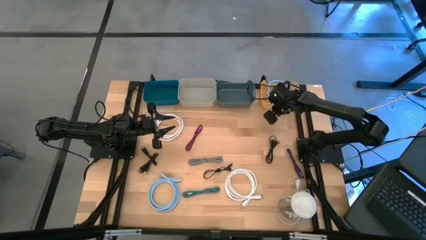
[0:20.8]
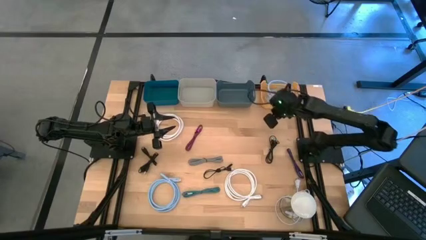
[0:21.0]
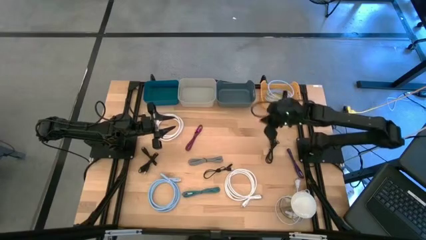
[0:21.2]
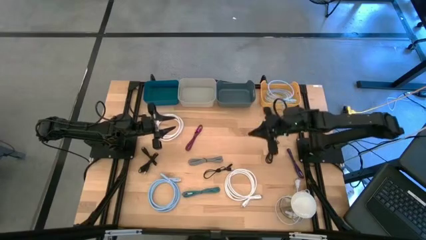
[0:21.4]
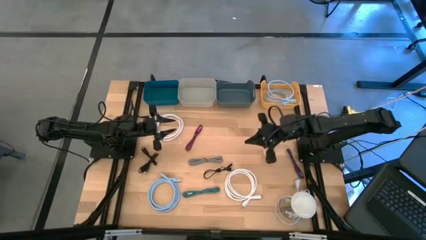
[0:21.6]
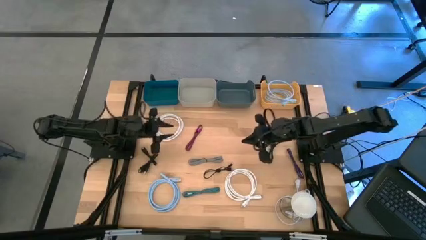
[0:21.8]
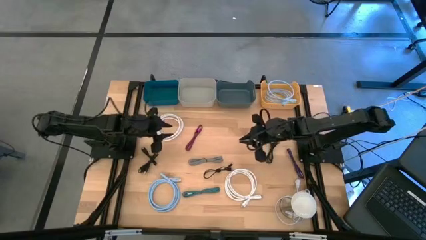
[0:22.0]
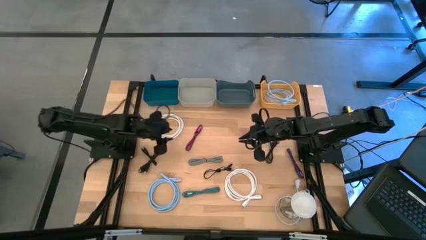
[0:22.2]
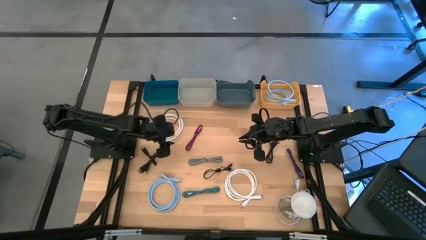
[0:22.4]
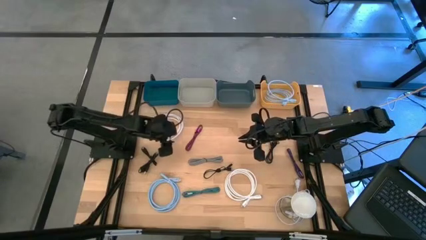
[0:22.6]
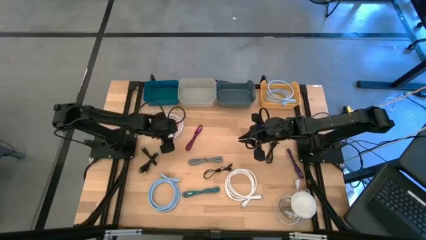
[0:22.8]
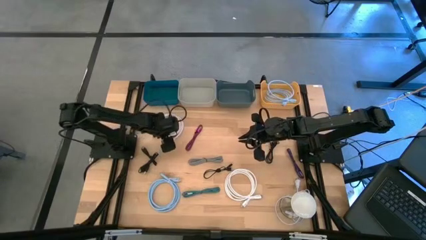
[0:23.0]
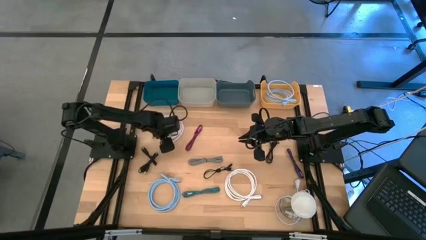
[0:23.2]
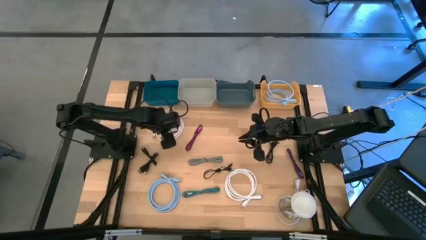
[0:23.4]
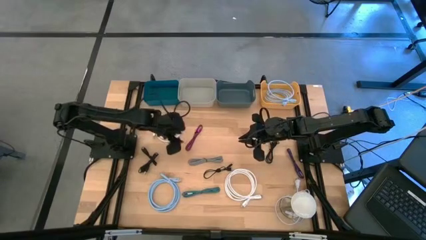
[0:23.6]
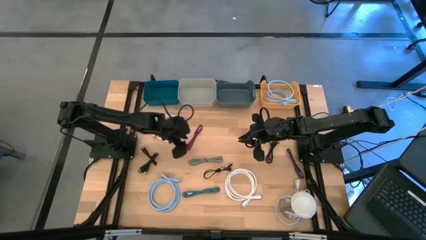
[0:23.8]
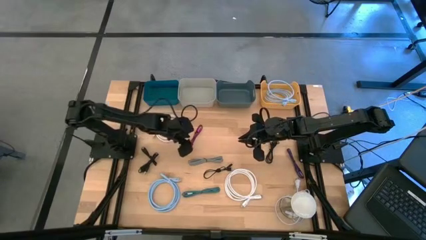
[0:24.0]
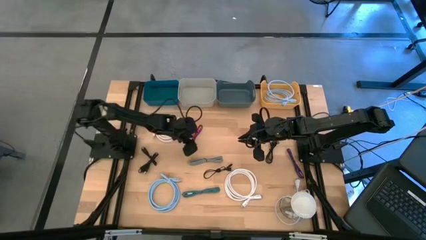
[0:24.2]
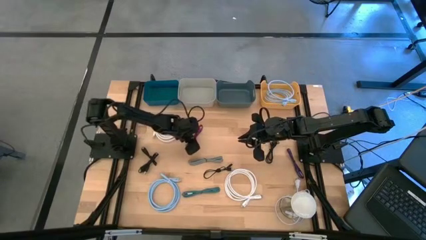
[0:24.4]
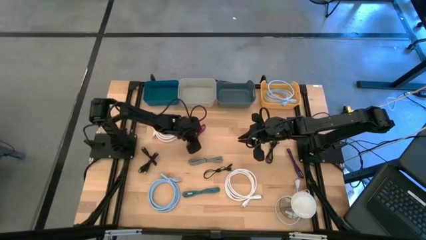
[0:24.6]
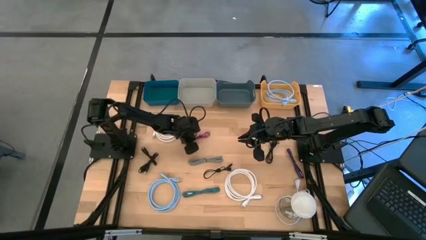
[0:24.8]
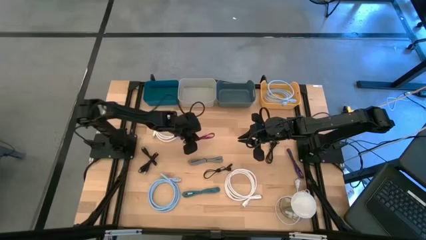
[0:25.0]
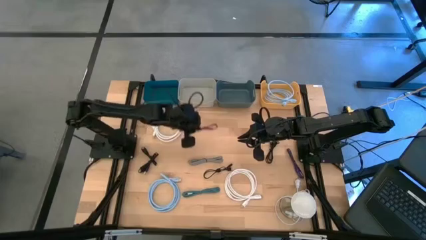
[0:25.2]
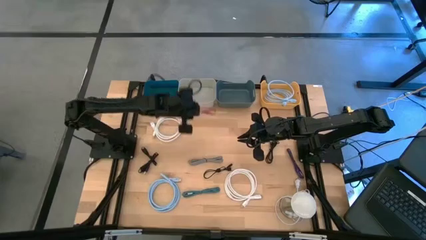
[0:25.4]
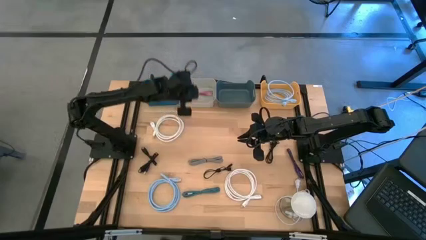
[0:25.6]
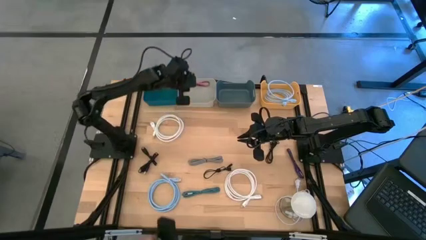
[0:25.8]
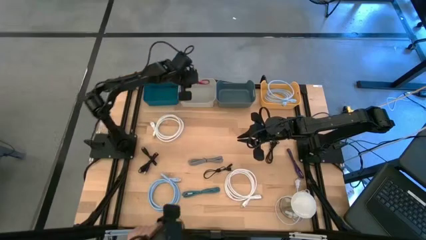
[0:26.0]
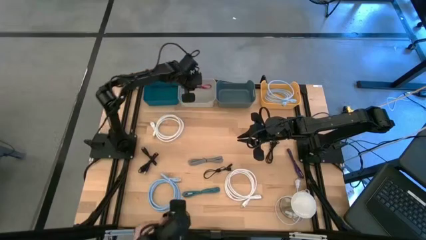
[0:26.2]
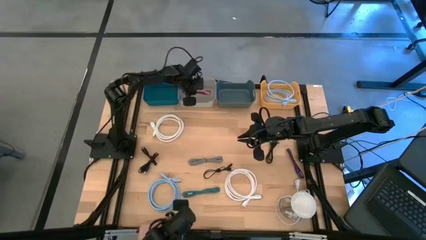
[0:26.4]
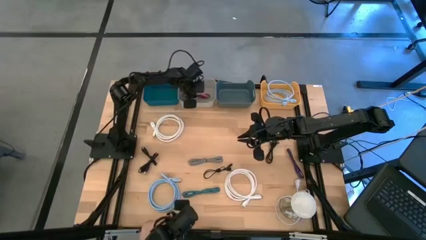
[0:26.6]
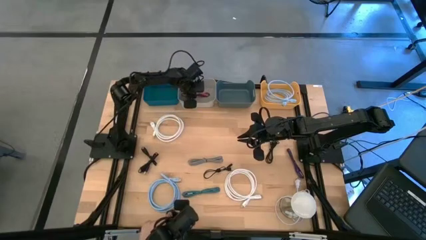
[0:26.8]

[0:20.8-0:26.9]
Task: Pick & Place USB Port
Put the black and pink USB cable into the gray bin

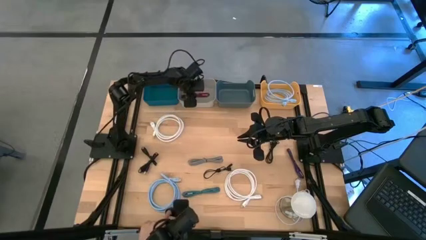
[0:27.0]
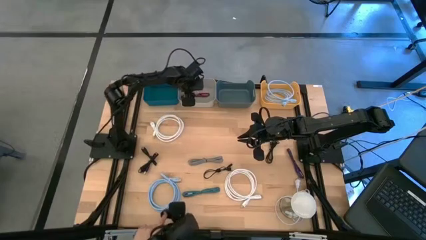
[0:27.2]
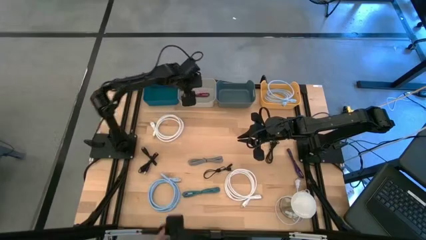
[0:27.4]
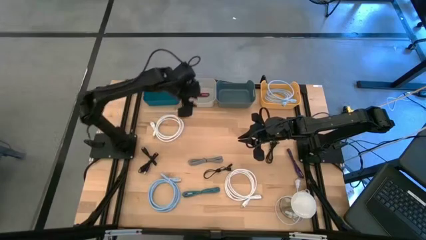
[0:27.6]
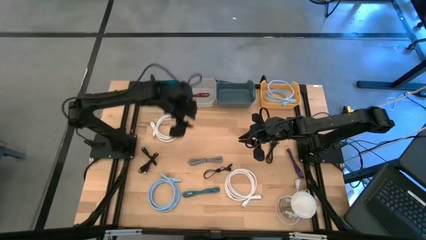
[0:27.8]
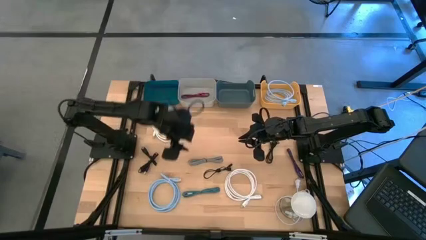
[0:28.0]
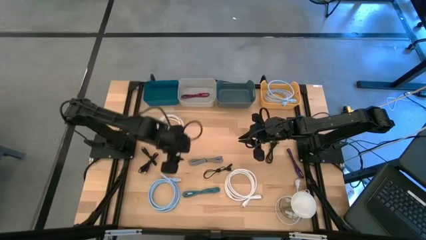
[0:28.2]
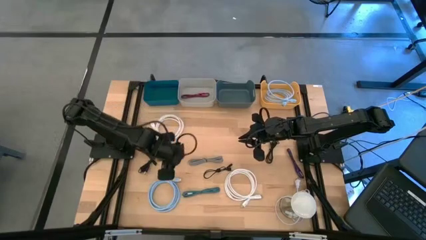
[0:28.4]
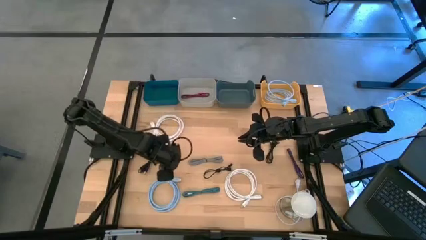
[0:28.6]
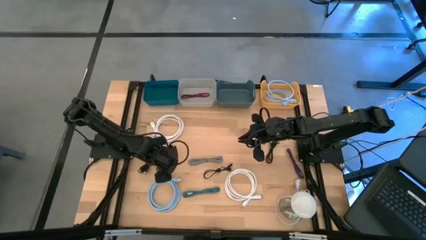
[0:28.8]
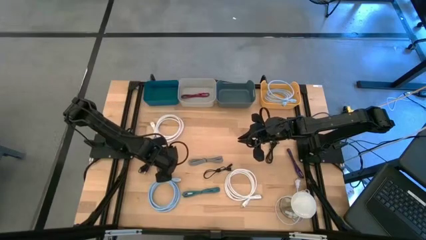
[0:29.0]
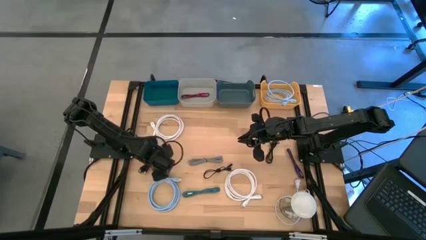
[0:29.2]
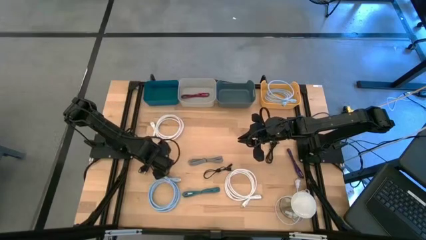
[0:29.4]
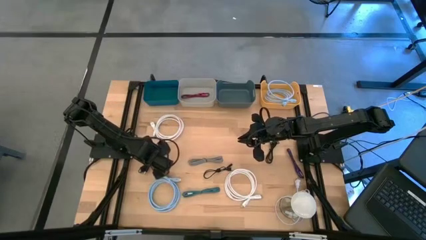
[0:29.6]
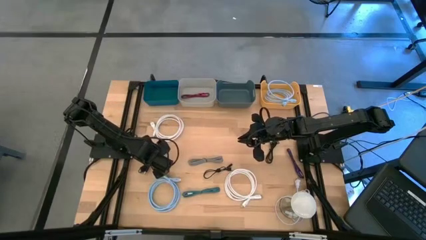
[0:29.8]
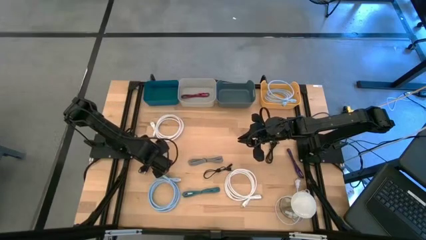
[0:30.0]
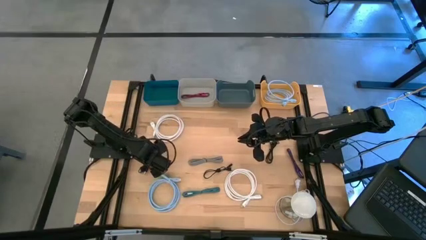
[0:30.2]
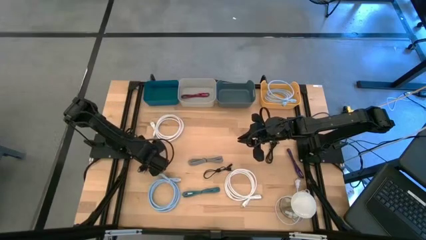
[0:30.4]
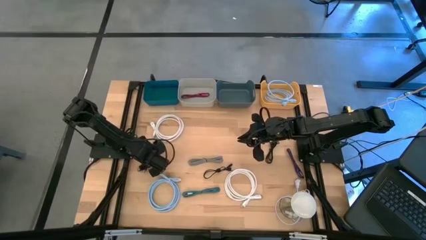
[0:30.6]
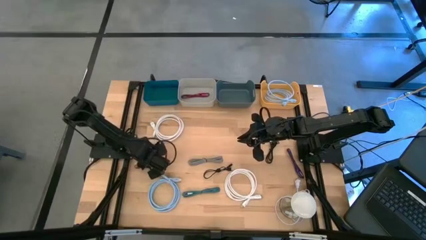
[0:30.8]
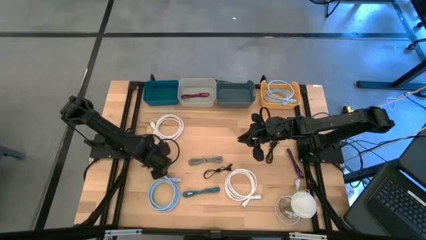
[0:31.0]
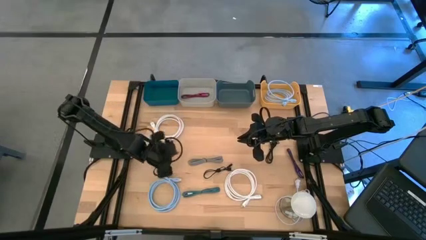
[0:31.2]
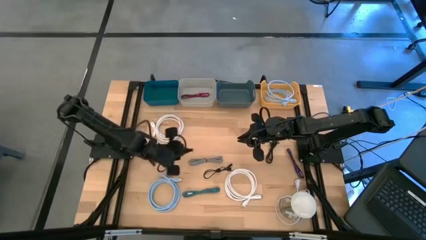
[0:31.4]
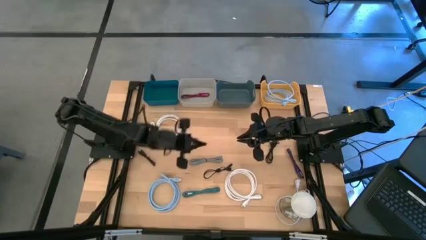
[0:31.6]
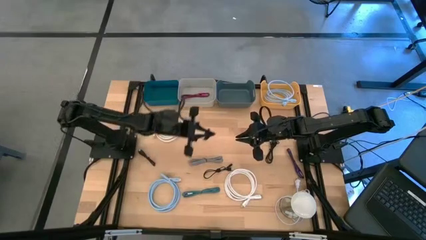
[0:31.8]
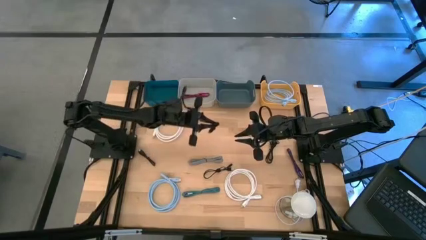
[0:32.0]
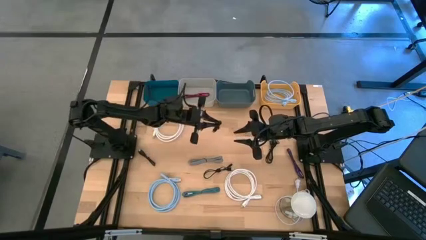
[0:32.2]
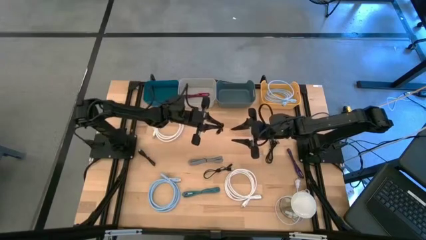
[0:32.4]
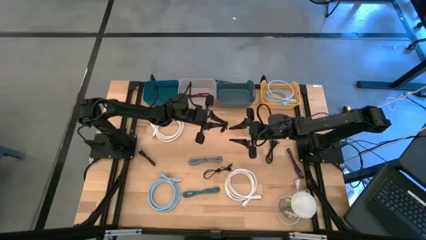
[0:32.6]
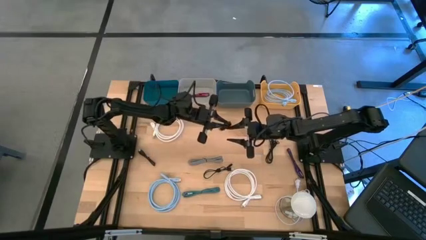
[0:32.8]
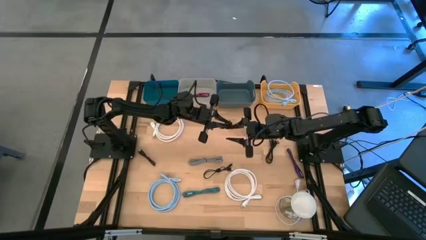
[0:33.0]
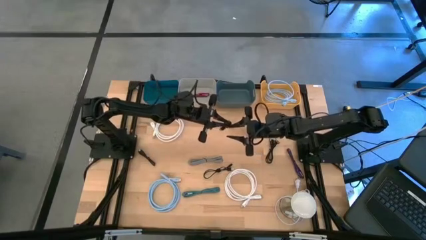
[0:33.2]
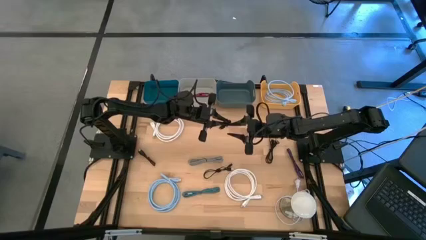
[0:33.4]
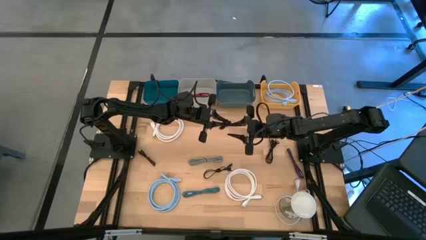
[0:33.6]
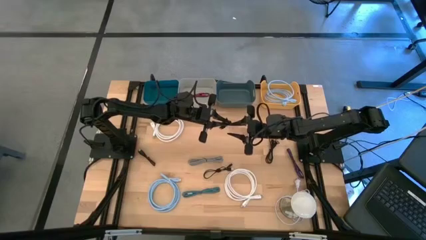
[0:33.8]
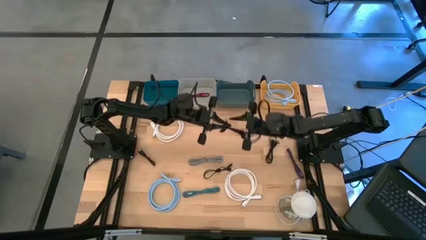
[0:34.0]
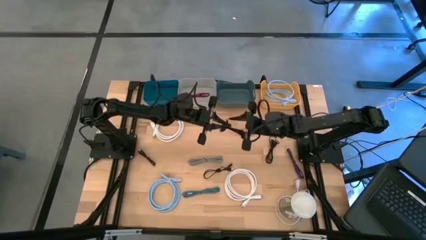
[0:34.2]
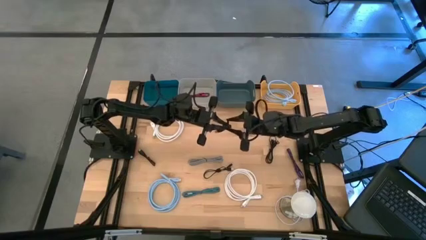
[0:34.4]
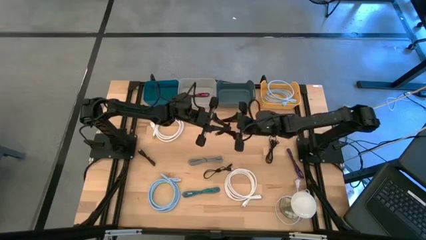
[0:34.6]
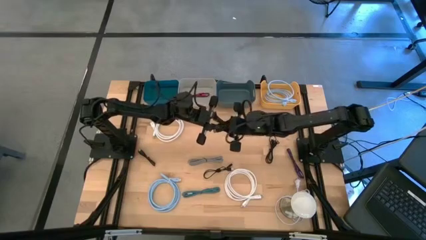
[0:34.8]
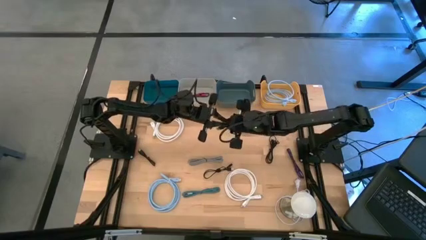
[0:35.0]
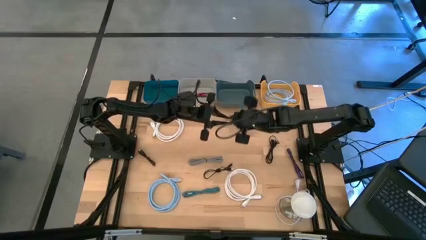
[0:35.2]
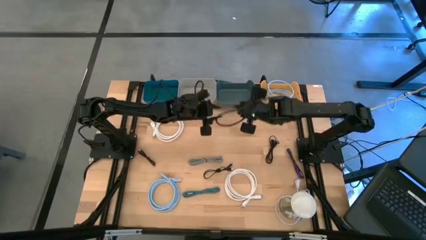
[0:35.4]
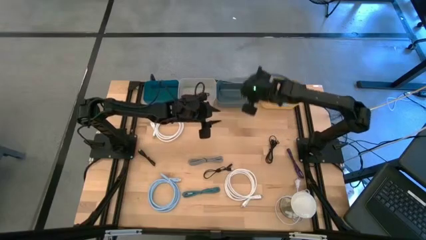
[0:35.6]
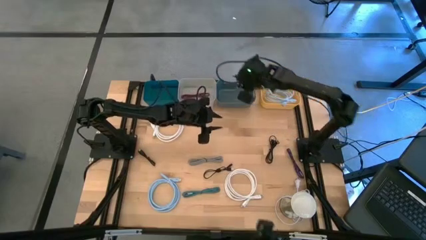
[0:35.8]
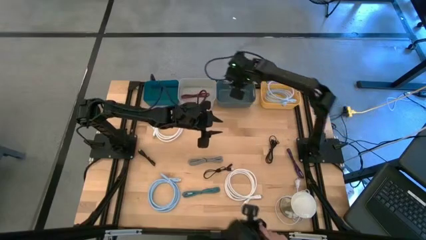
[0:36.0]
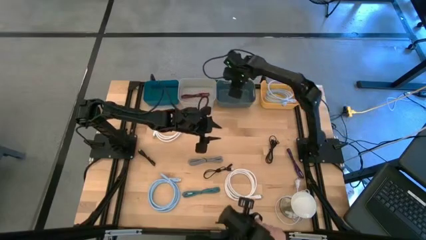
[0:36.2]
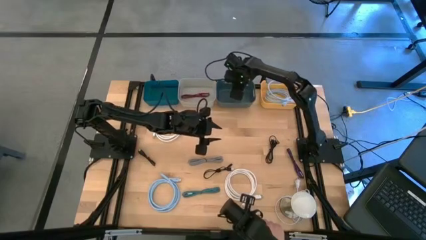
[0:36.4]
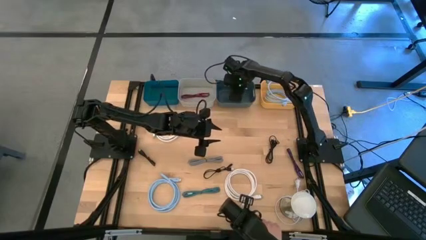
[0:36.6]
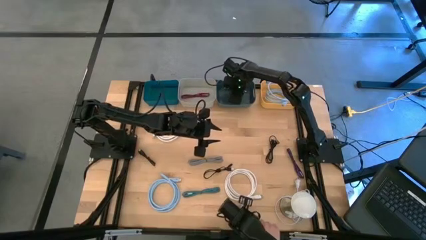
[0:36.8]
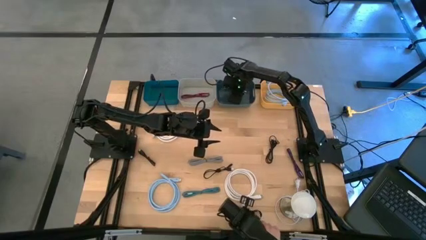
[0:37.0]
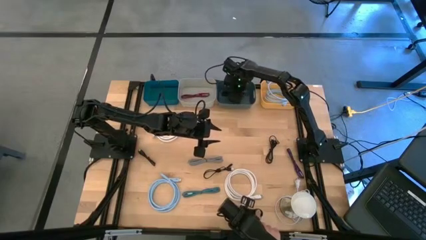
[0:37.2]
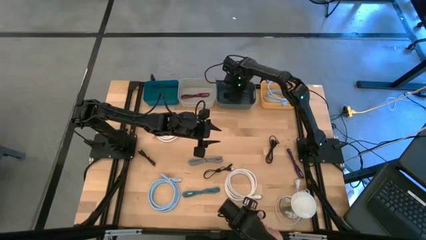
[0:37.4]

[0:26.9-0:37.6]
Put the black USB cable into the dark blue bin
